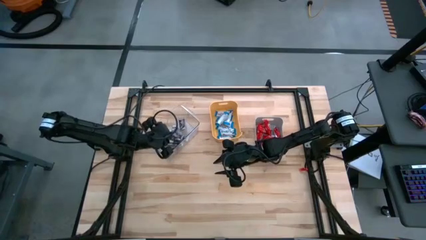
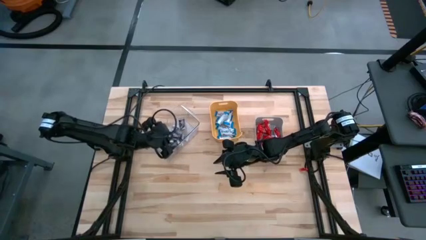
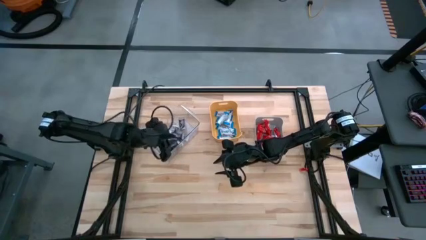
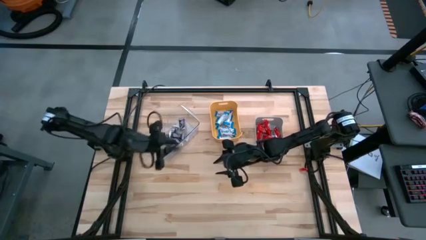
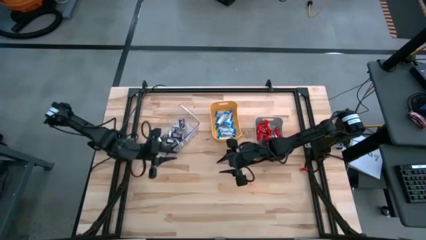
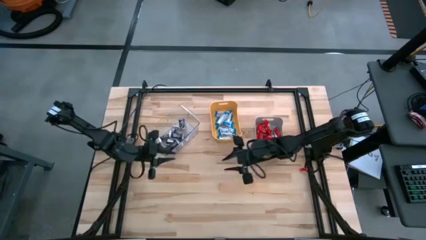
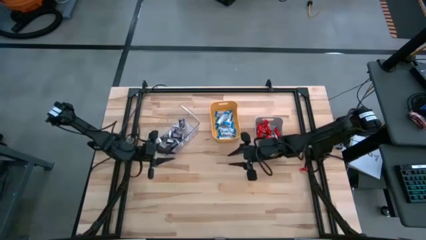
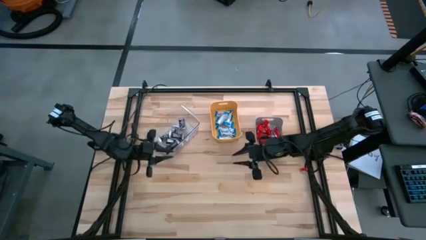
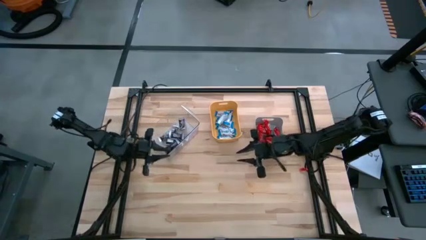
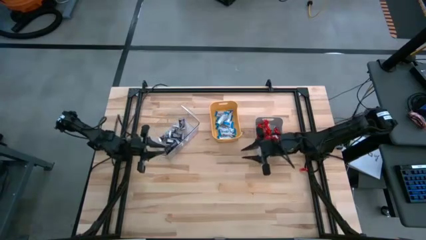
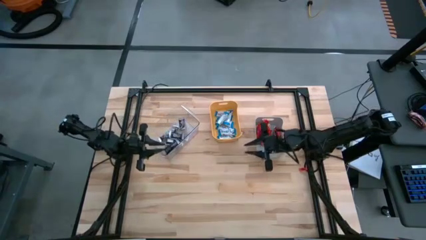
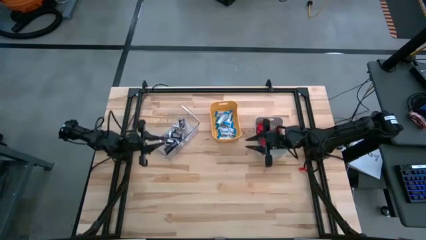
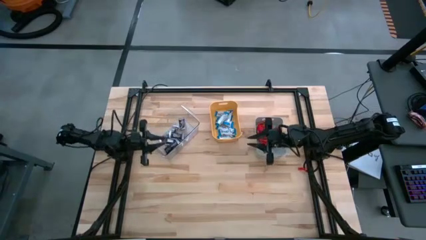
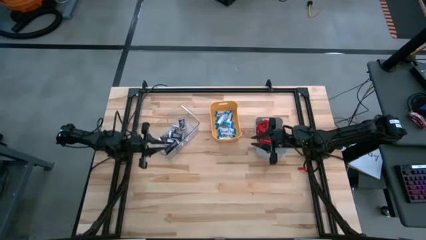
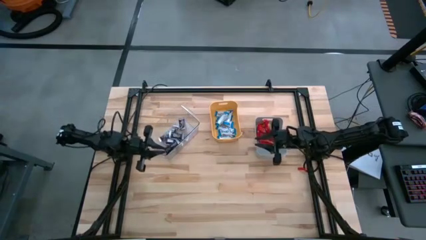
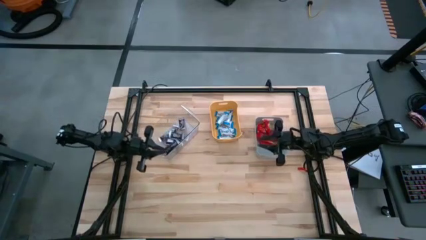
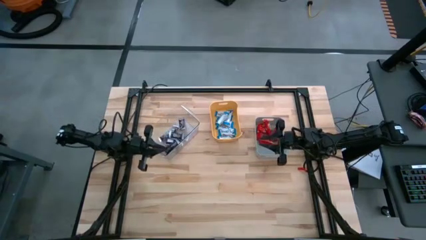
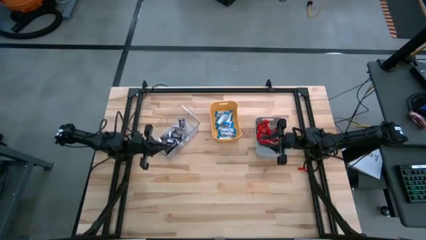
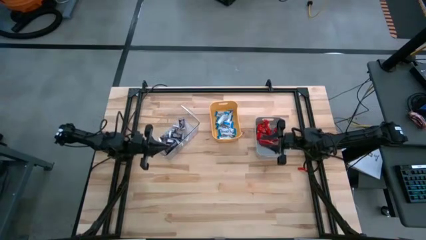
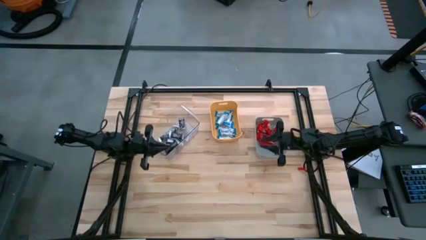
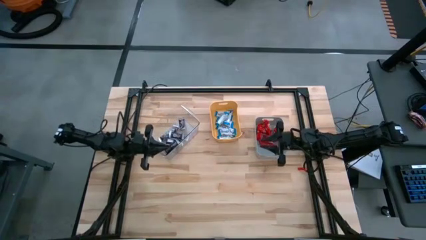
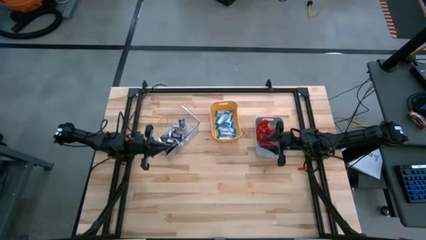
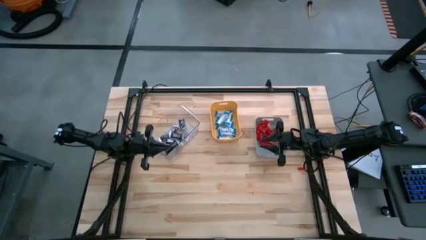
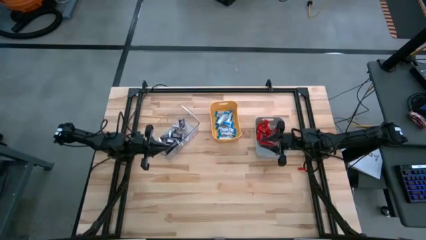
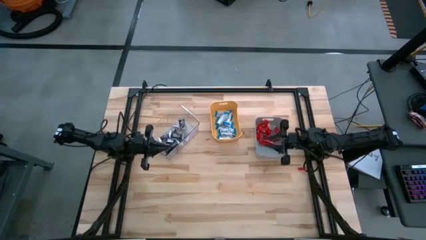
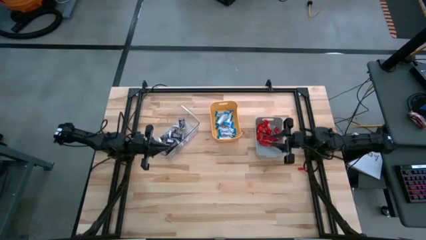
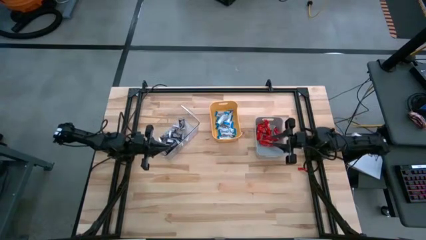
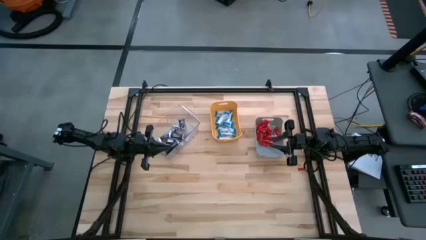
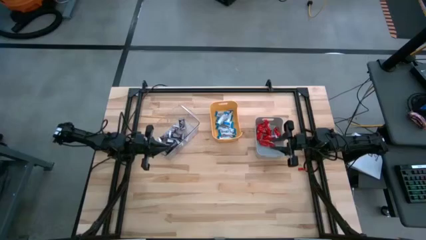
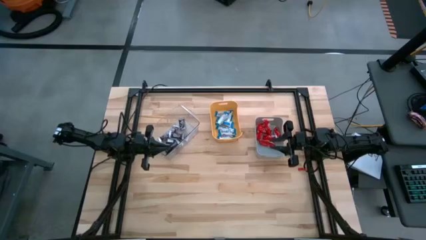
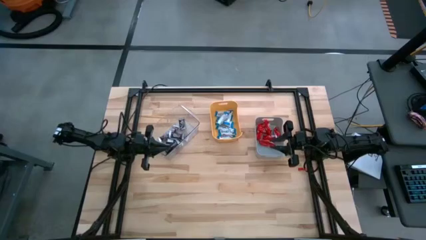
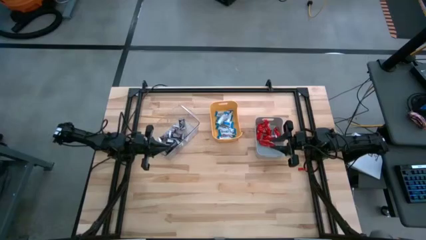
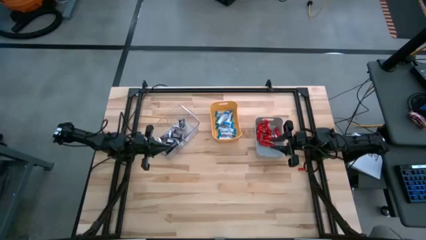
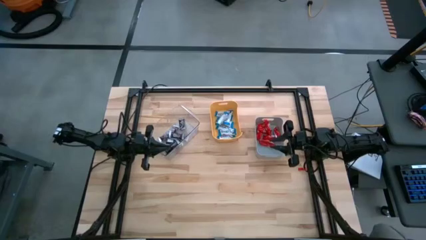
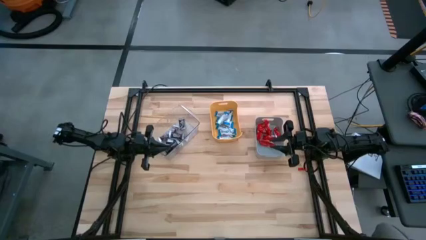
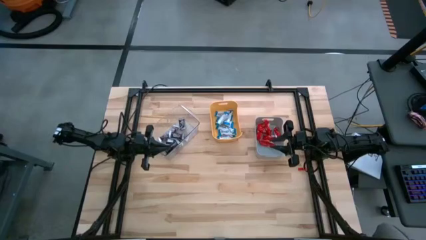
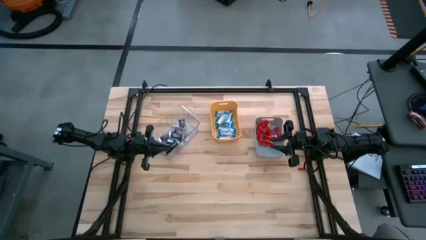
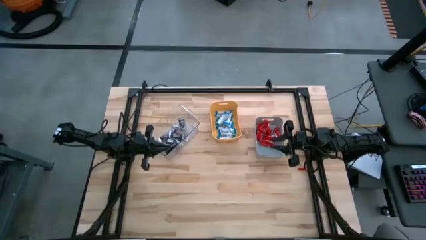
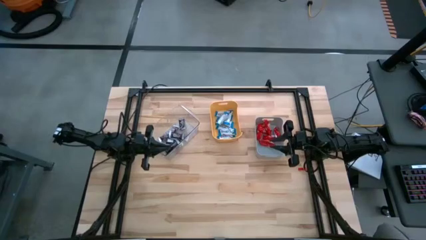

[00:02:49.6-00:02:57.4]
Task: Organize candy in baskets
Return to Home Position

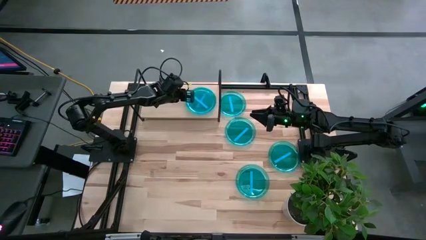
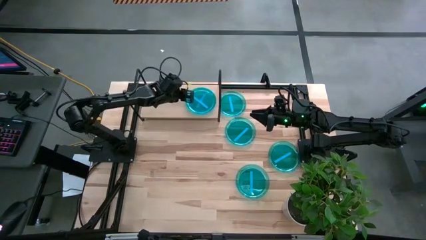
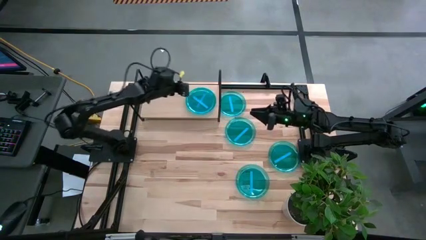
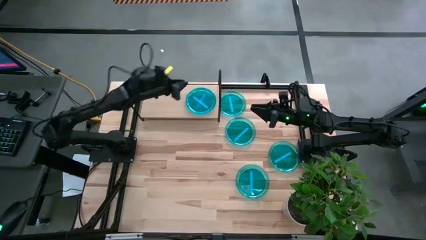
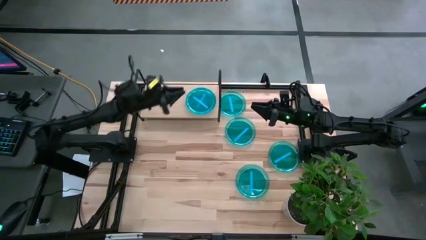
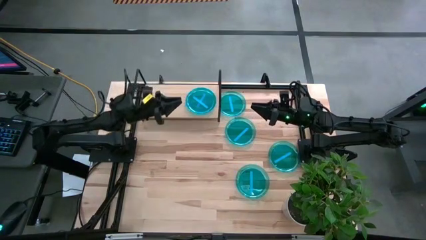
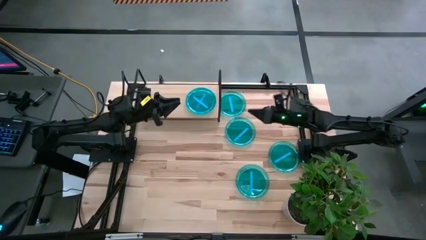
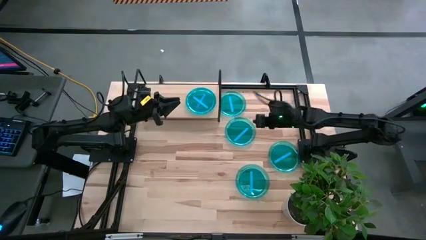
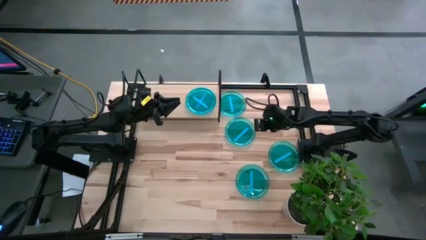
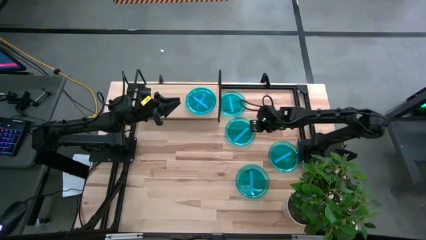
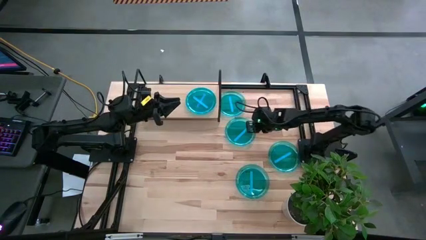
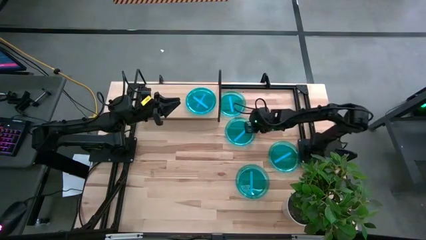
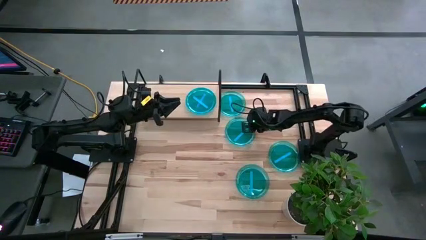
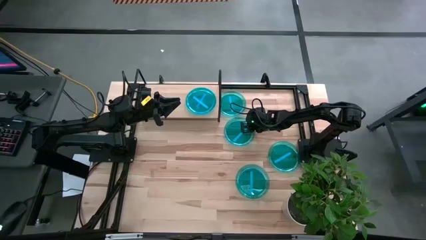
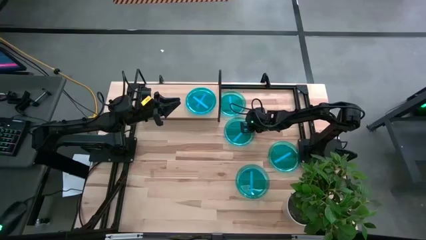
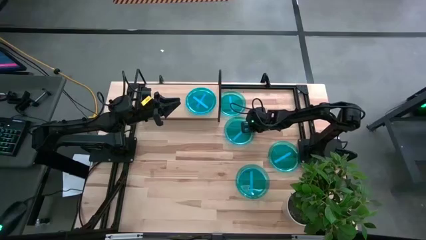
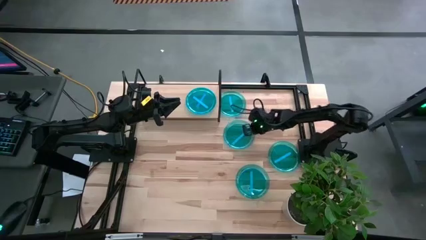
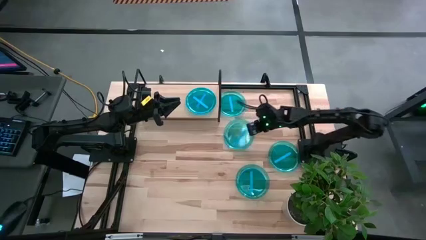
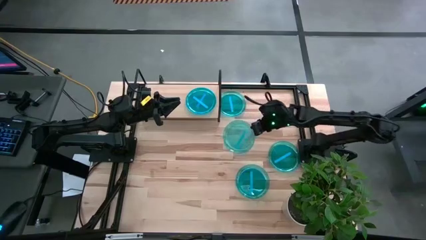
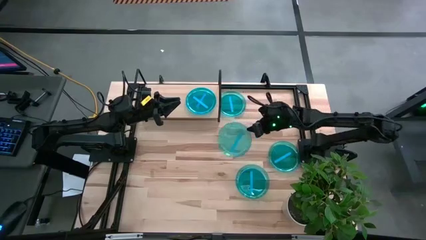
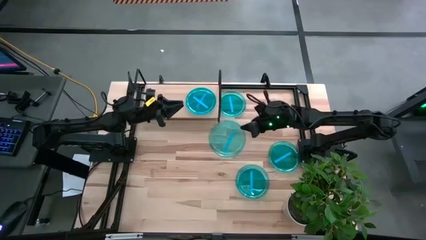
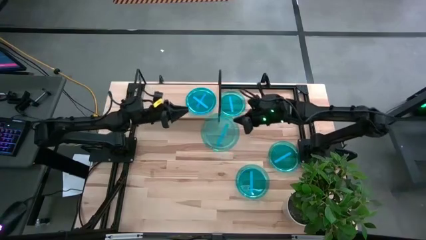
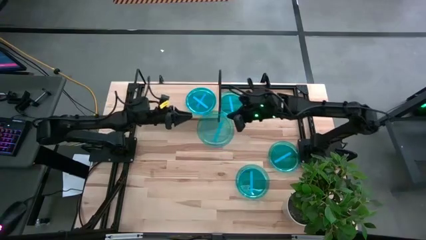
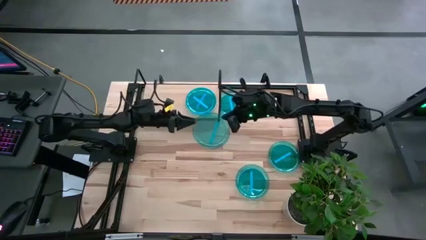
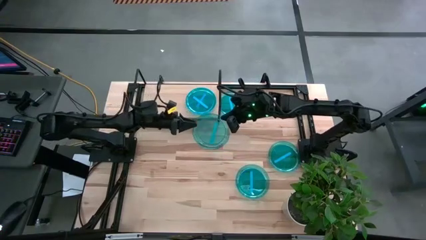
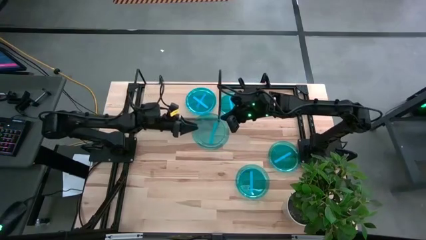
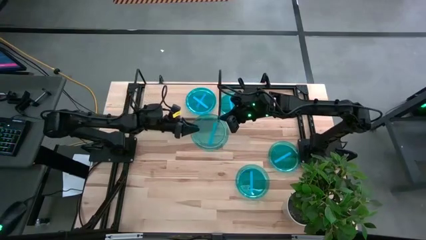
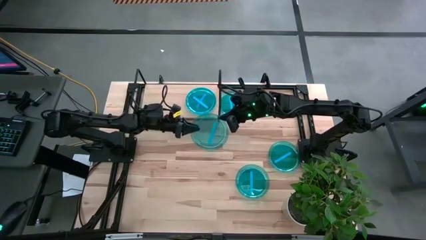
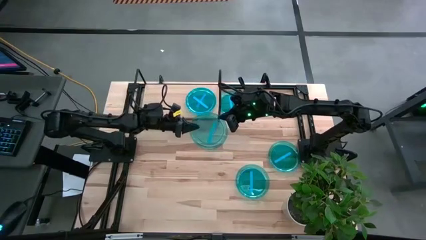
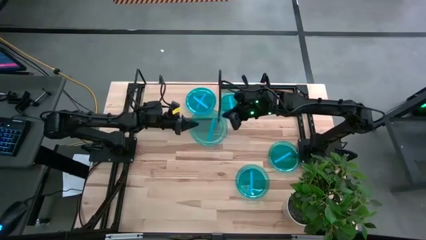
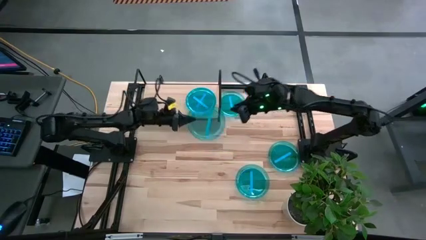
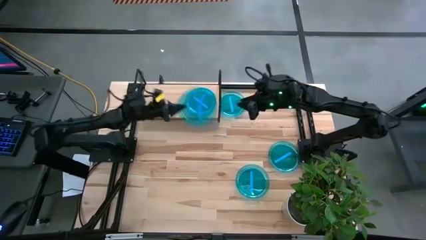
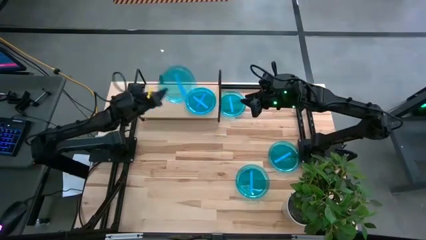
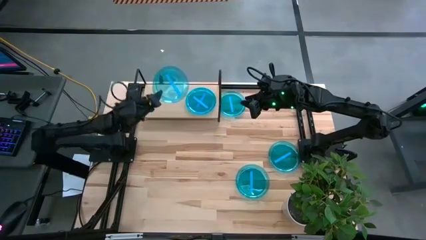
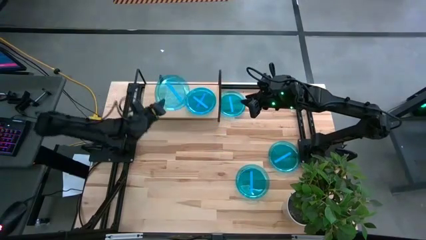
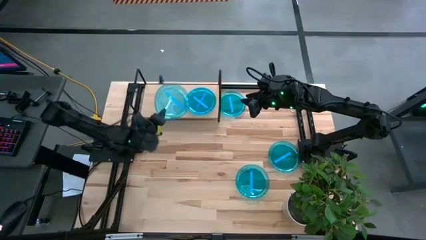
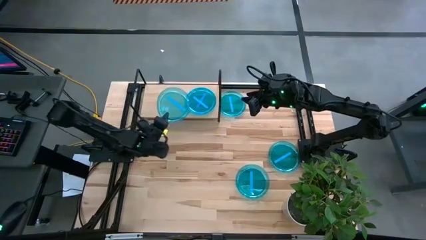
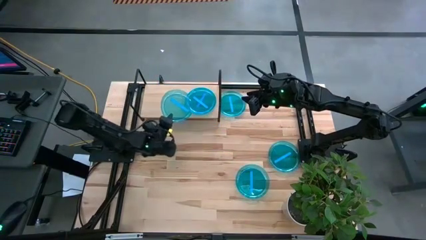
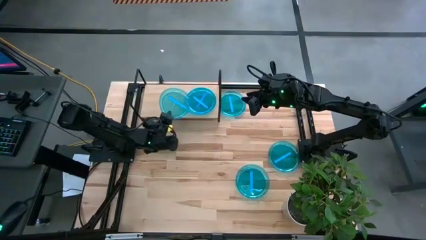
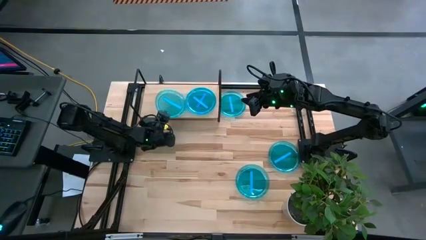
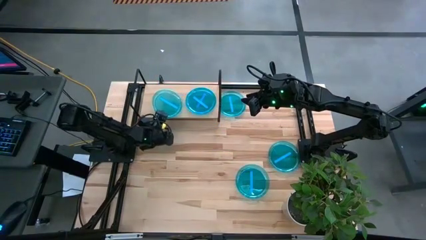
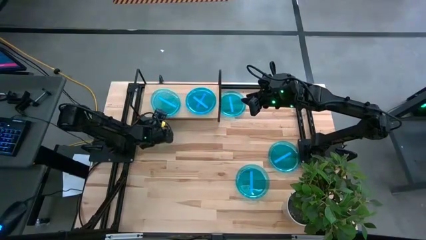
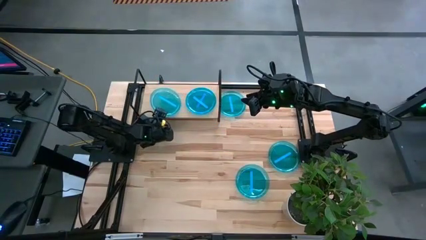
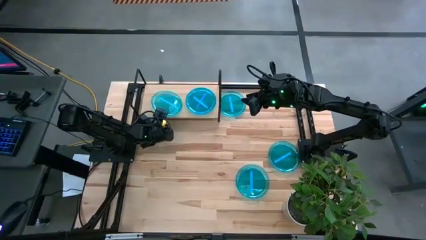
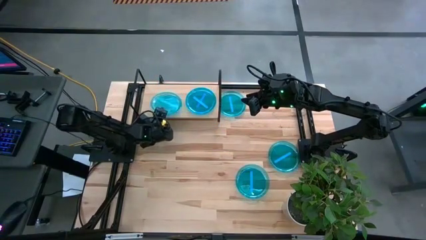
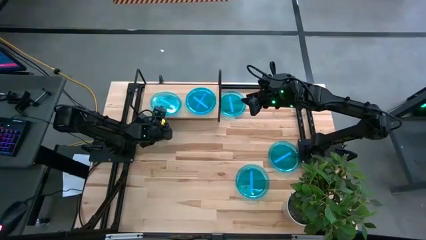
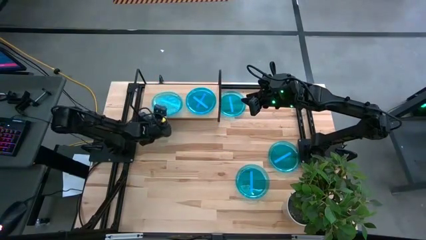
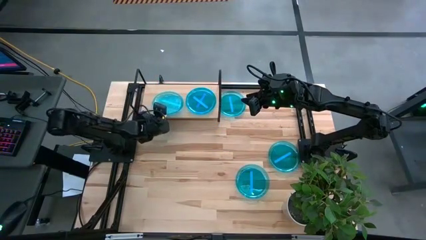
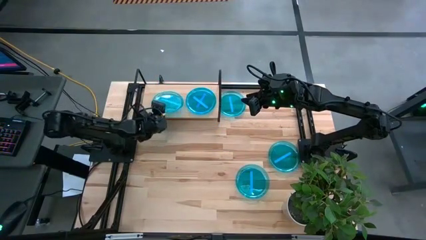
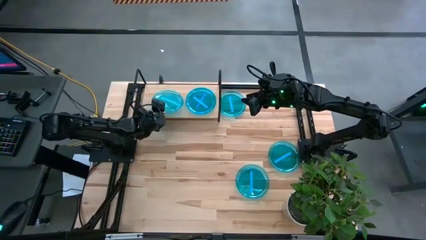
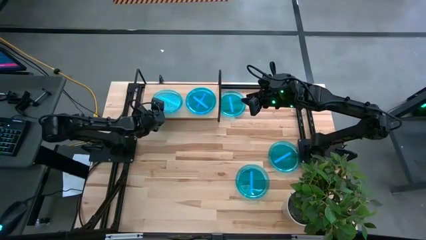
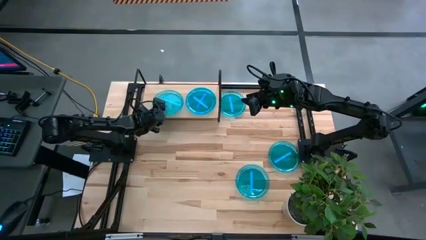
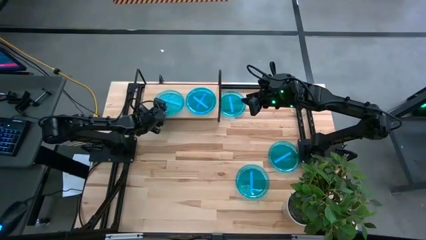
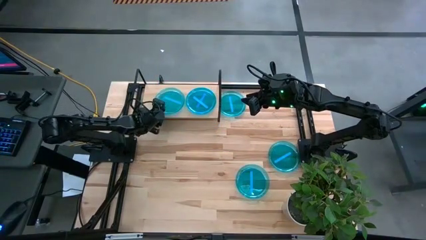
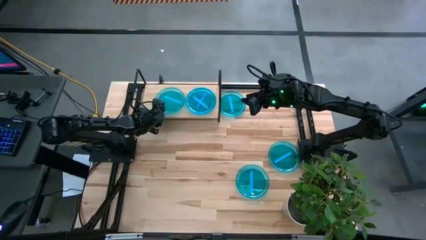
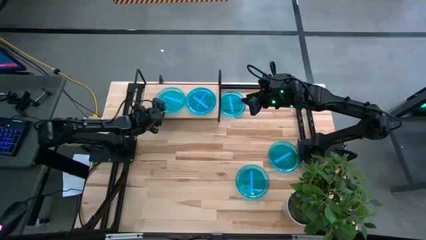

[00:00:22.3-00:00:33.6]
Task: Place and stack plates onto a shelf
Put the blue plate on the shelf
